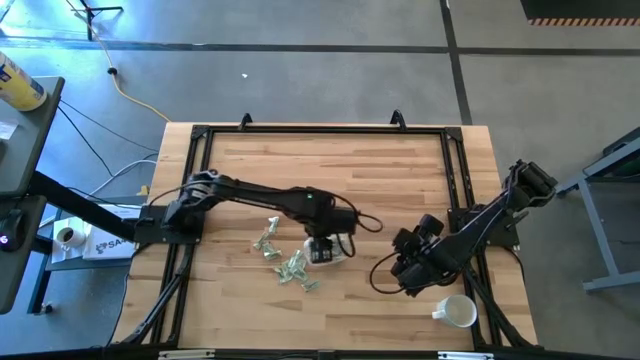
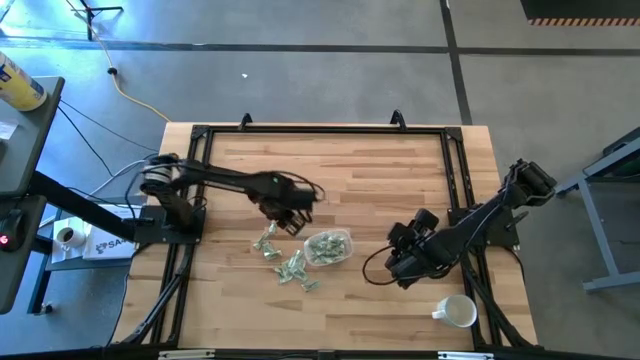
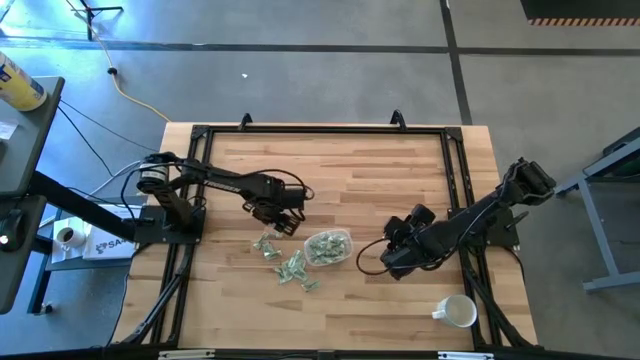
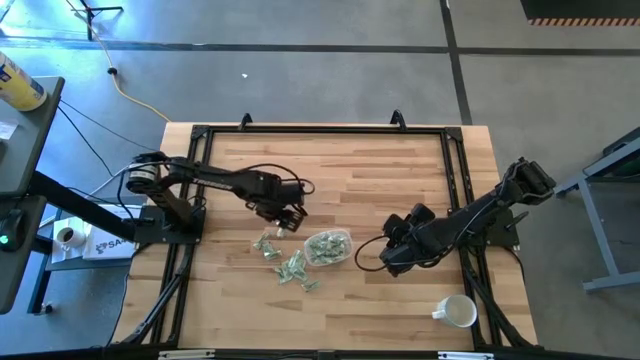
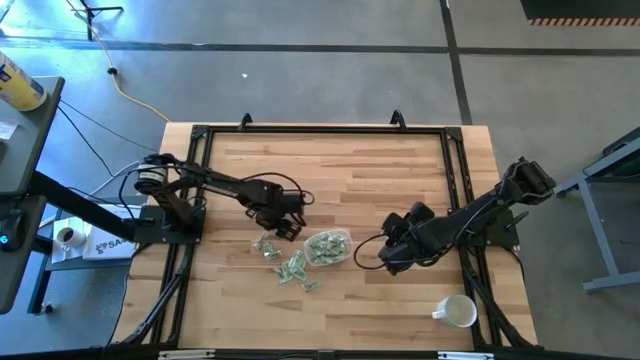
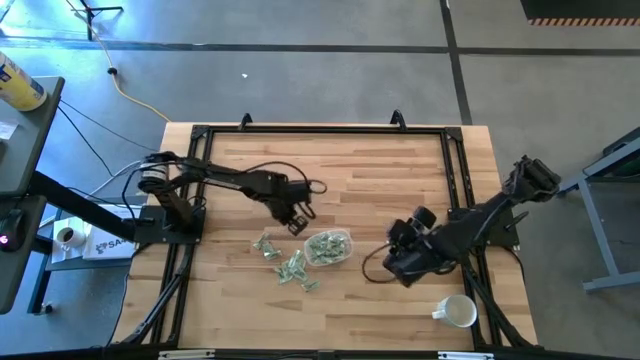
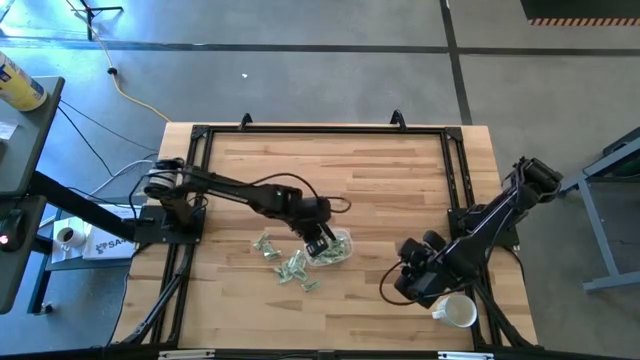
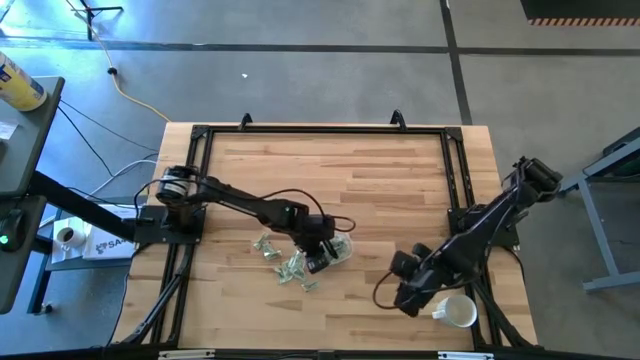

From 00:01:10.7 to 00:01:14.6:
Task: Pick and place Stevia / Truvia into bins
Put the stevia packet into the transparent bin

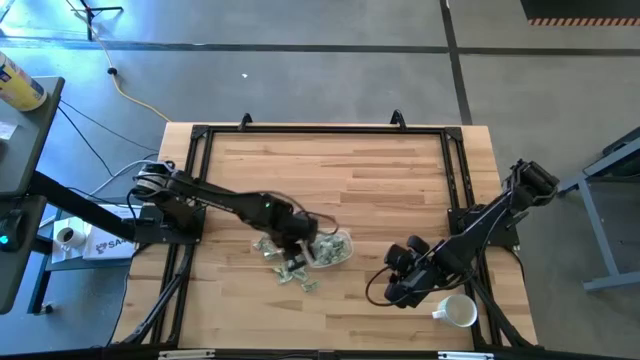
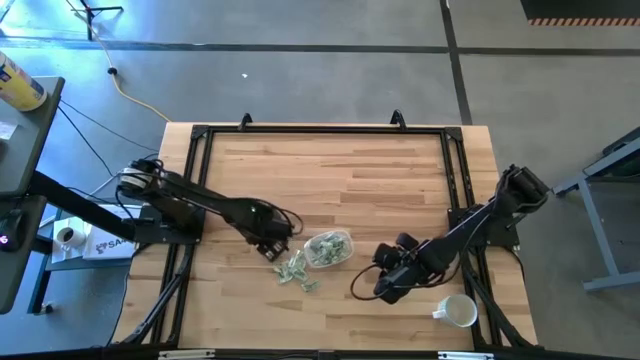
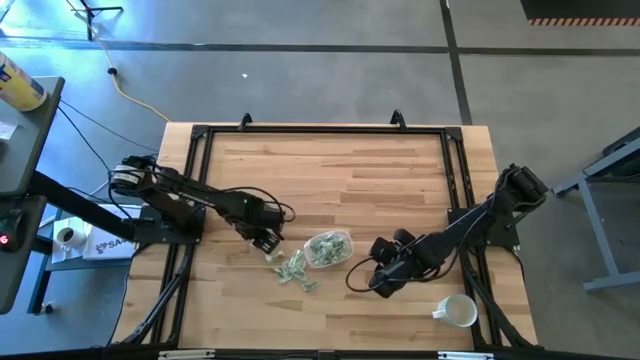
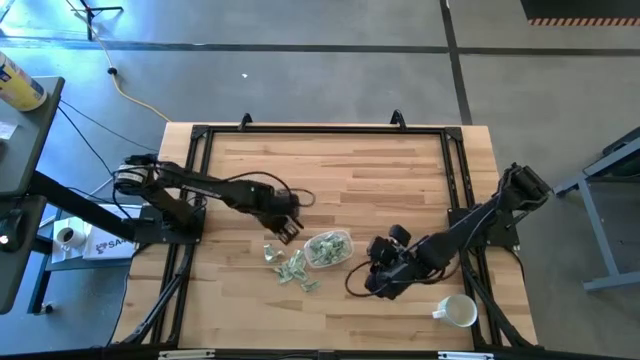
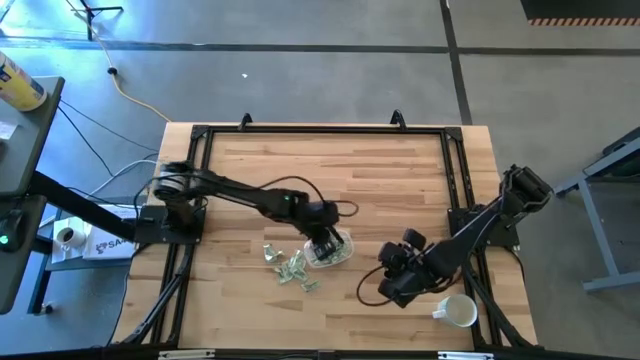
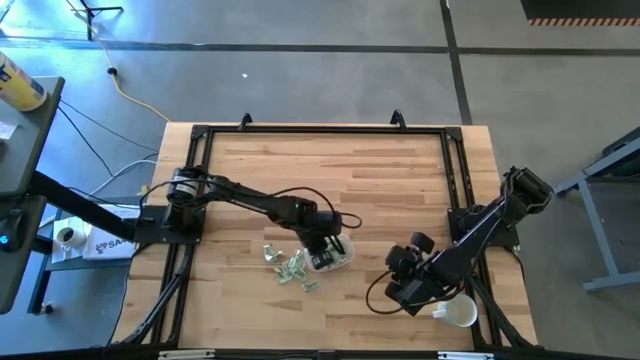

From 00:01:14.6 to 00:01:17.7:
Put the stevia packet into the transparent bin

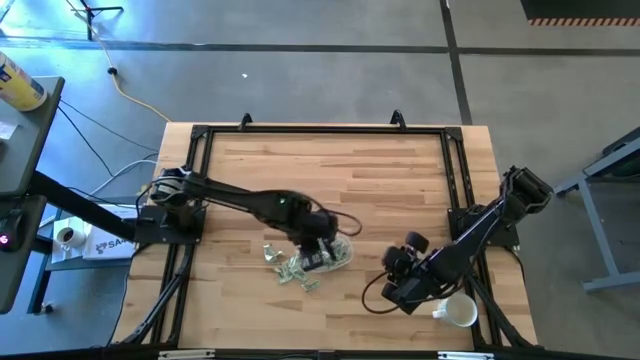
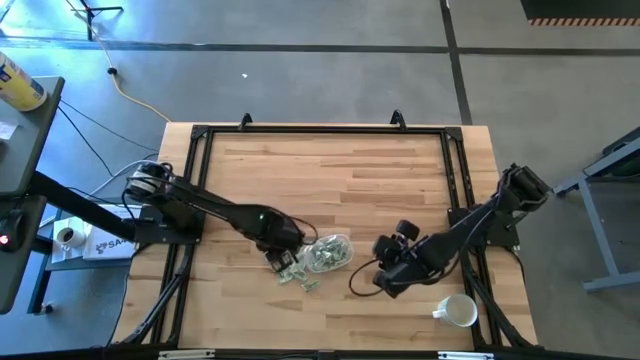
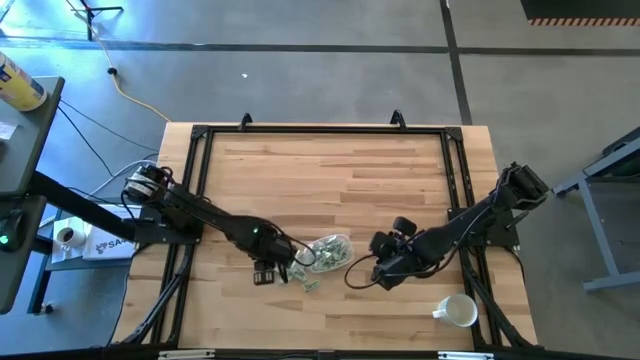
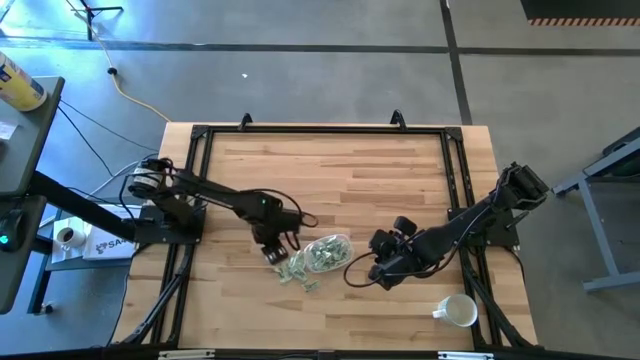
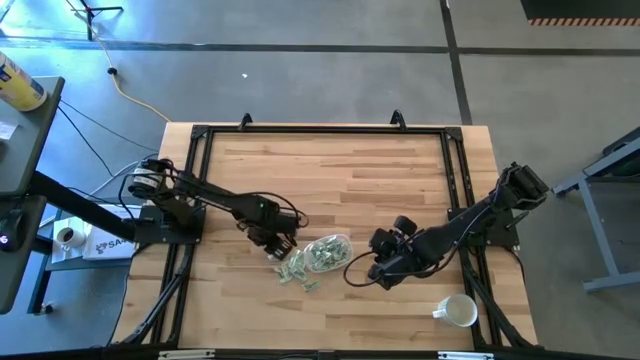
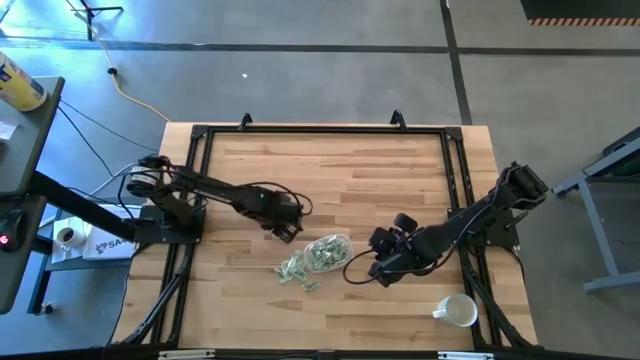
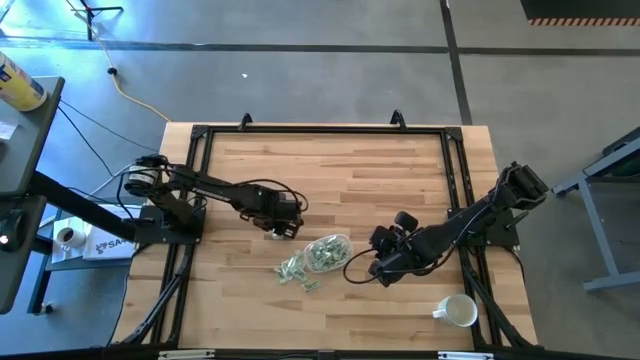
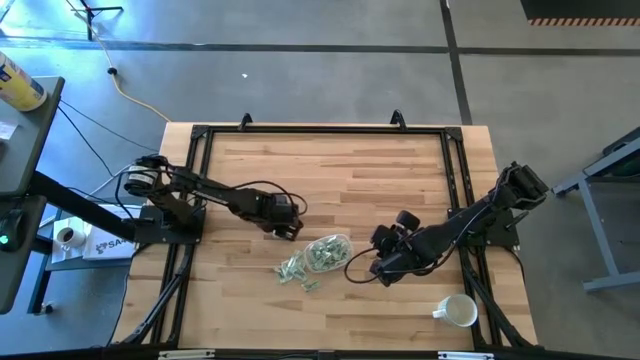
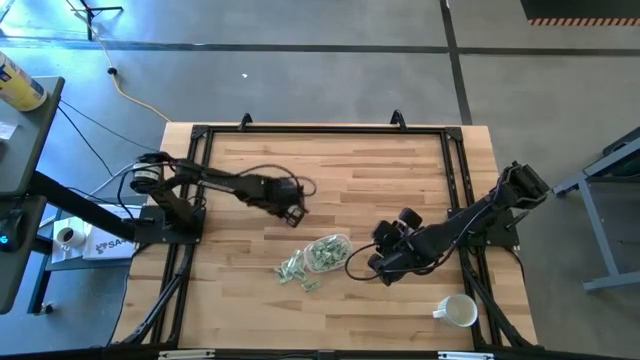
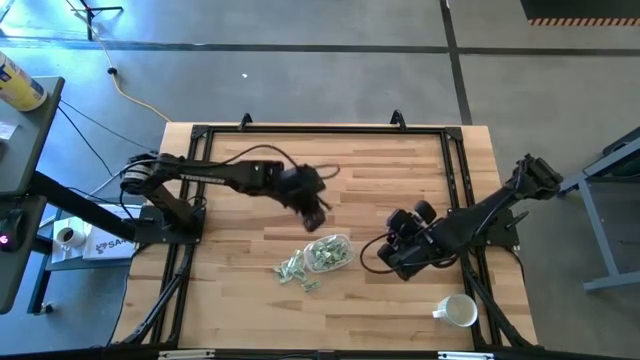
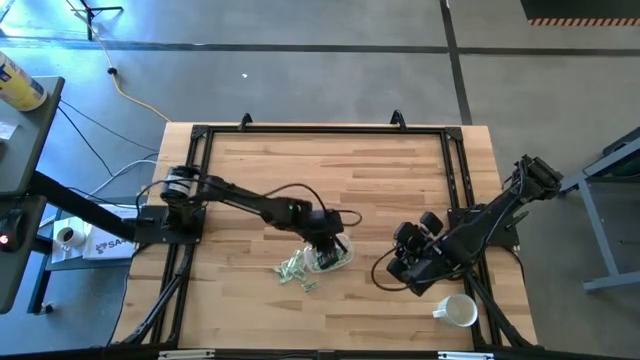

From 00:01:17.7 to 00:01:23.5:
Put the stevia packet into the transparent bin

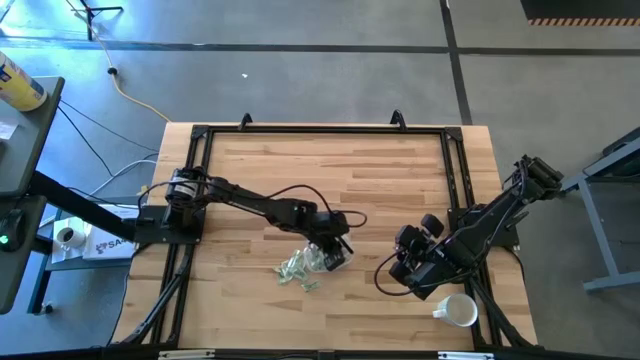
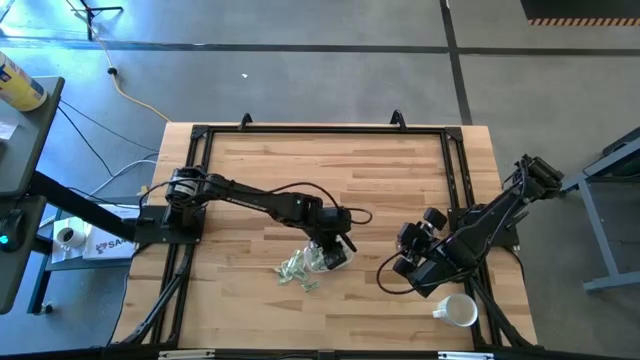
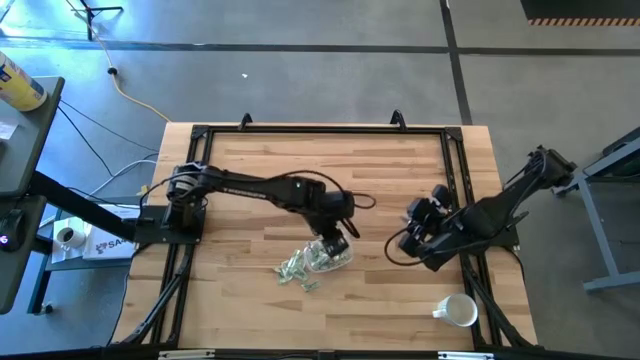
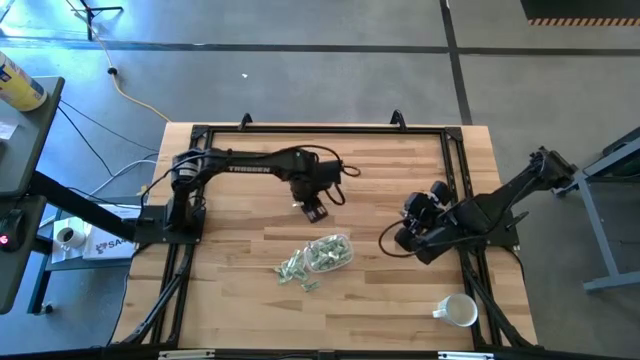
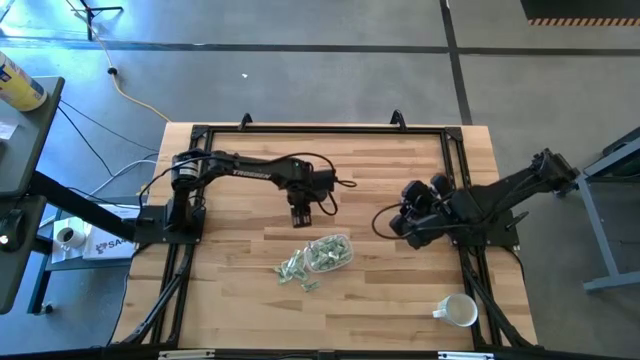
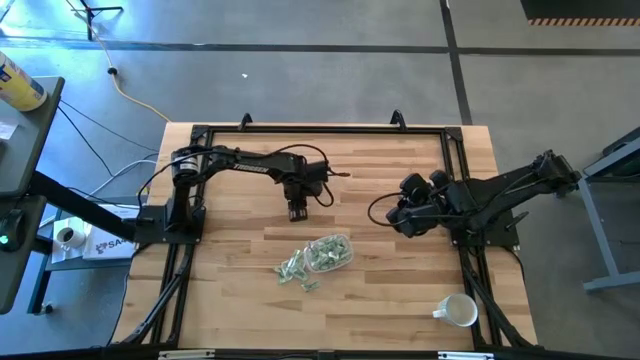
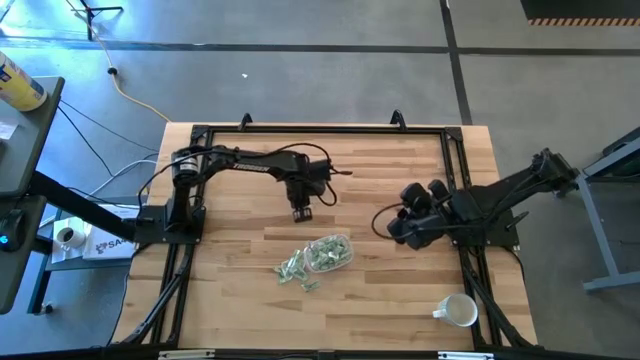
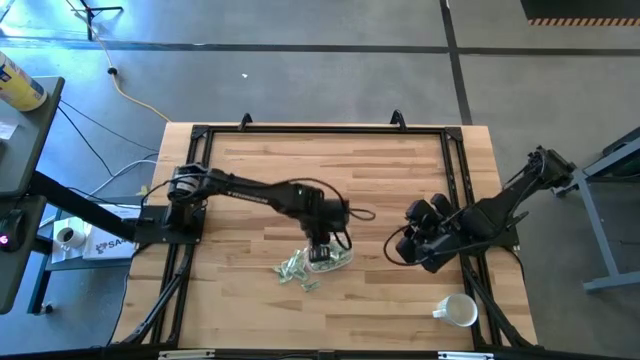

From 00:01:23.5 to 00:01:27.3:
Put the stevia packet into the transparent bin

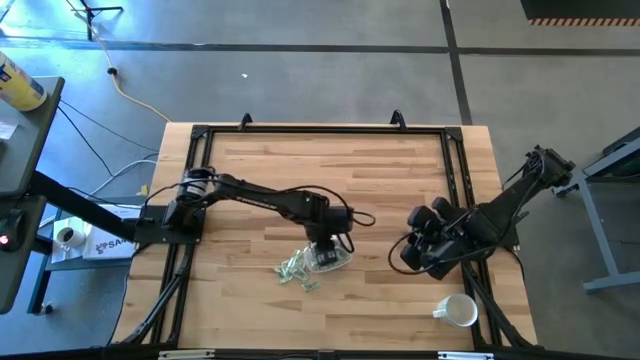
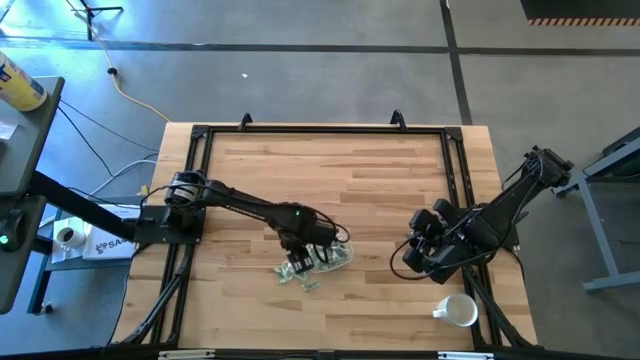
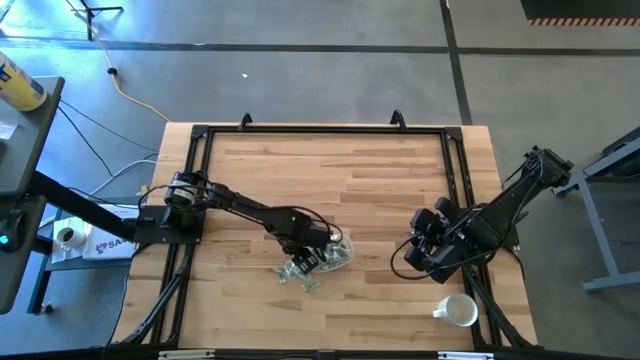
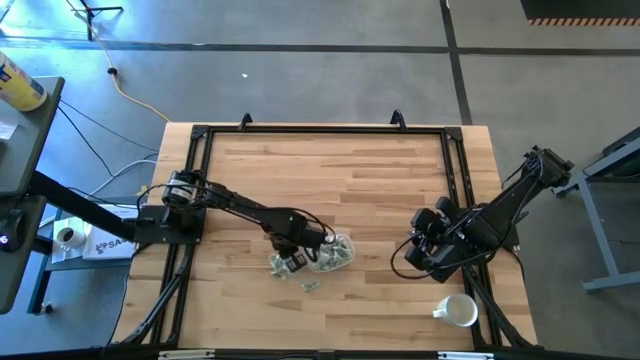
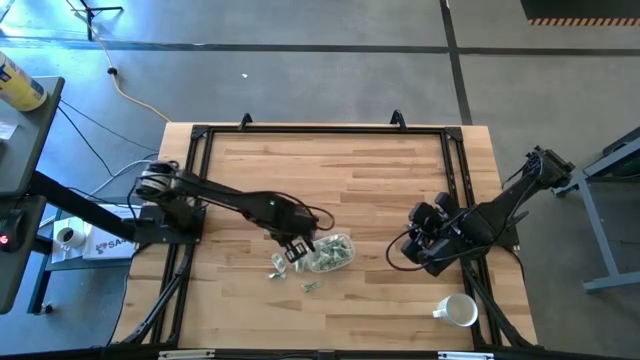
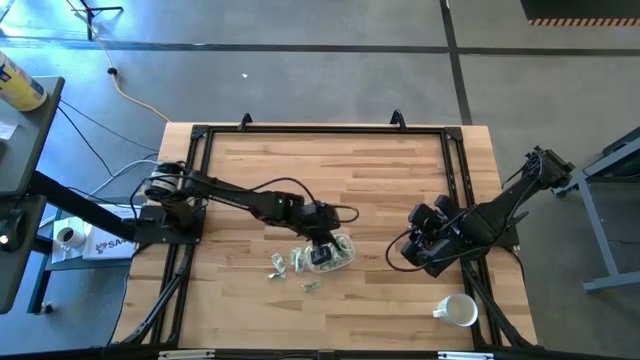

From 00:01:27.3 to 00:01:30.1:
Put the stevia packet into the transparent bin

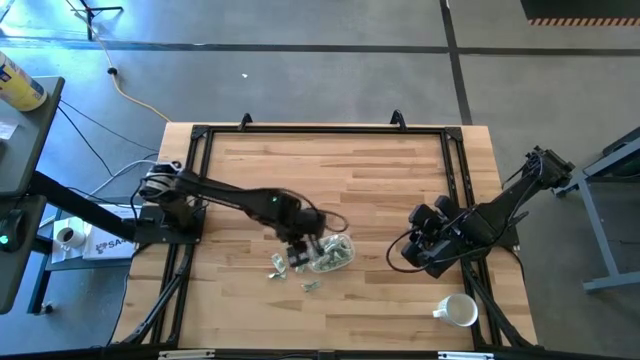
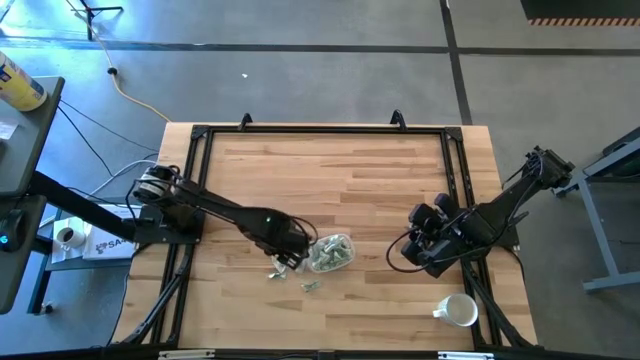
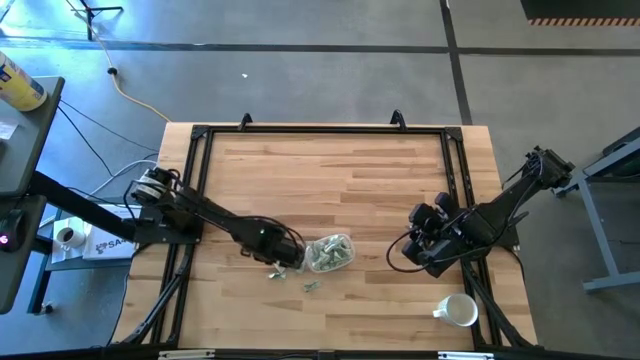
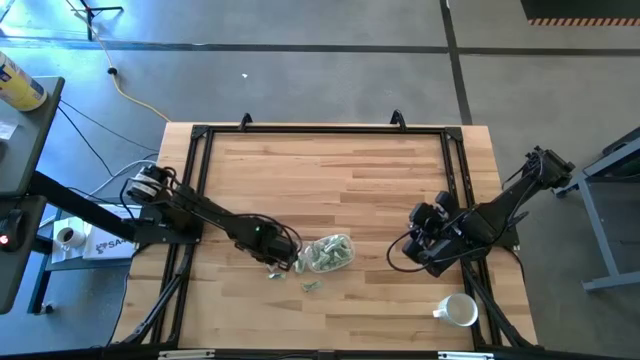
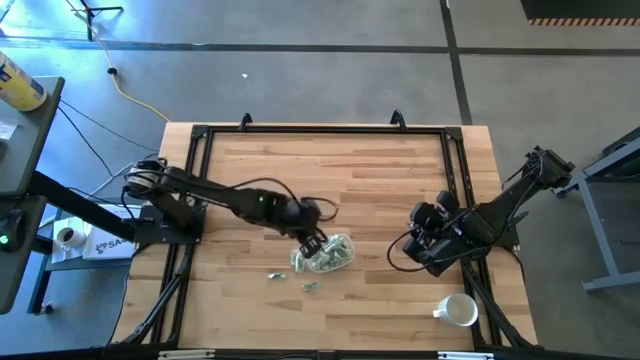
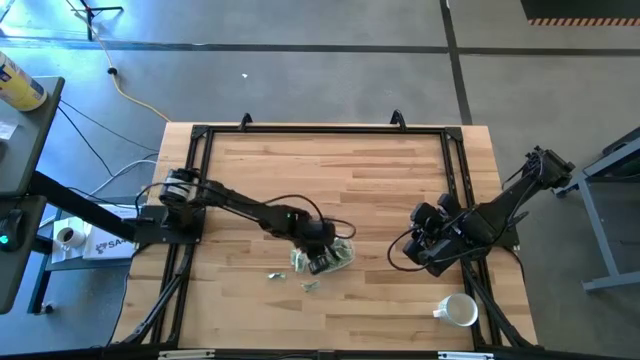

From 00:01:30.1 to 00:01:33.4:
Put the stevia packet into the transparent bin
